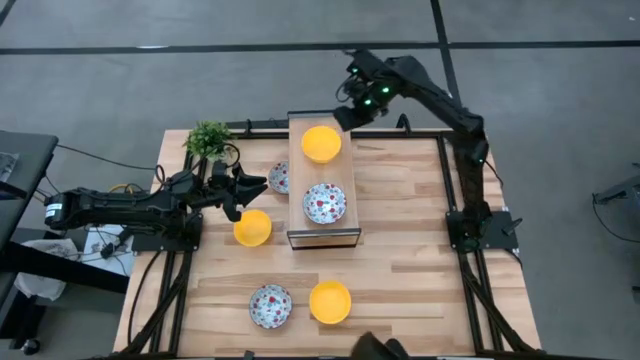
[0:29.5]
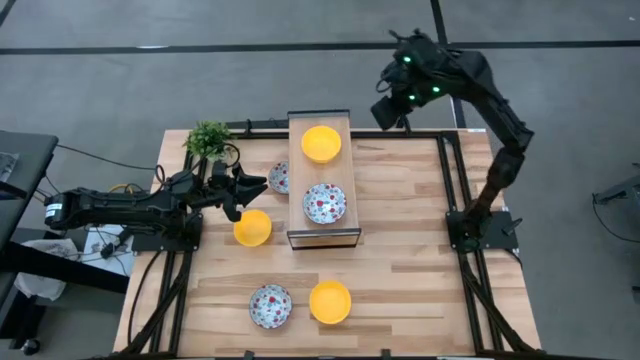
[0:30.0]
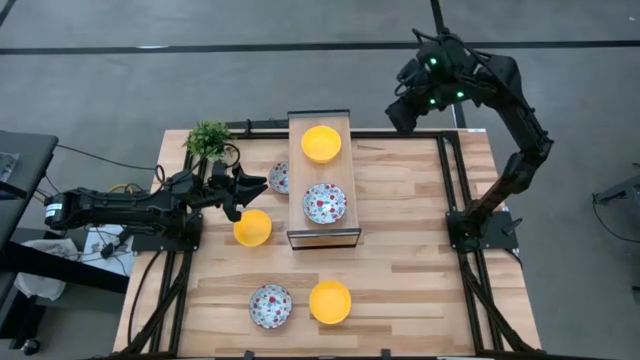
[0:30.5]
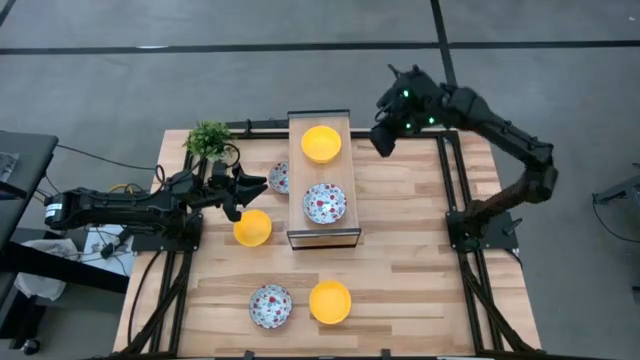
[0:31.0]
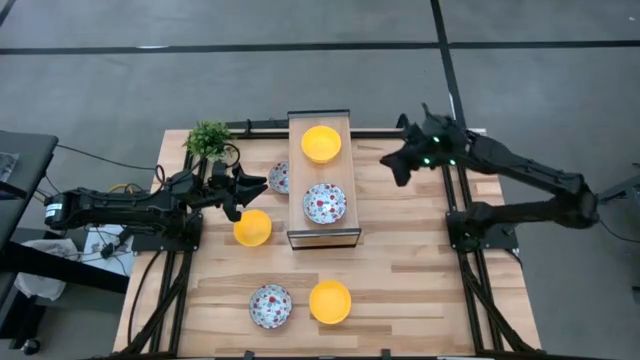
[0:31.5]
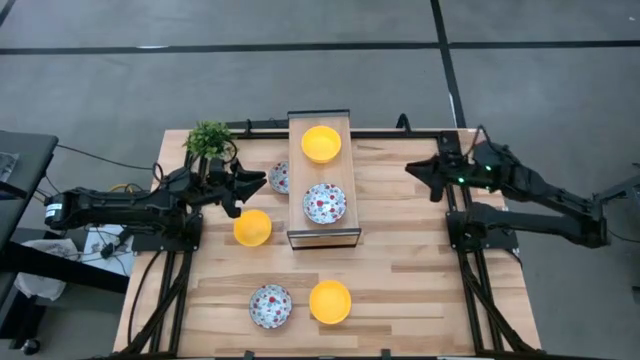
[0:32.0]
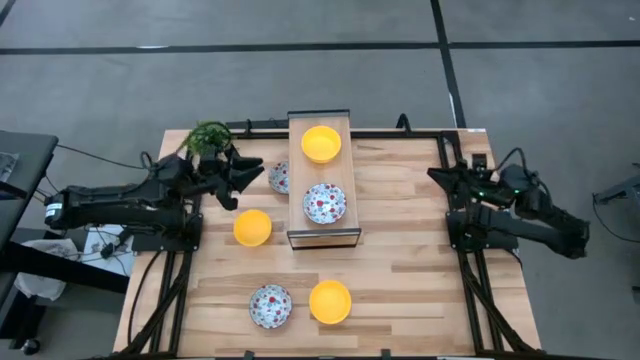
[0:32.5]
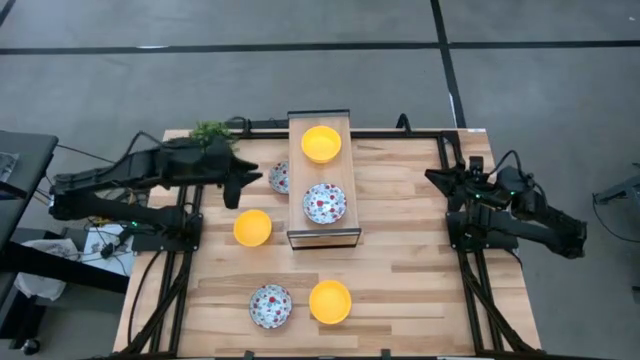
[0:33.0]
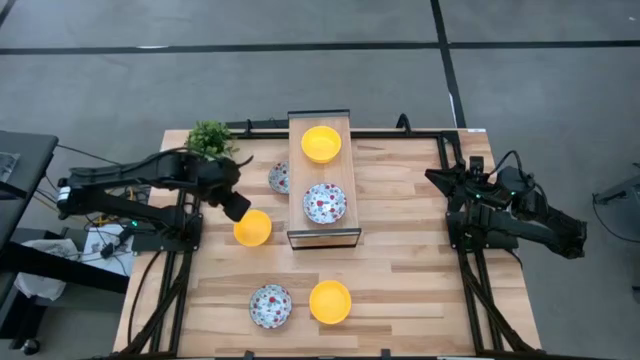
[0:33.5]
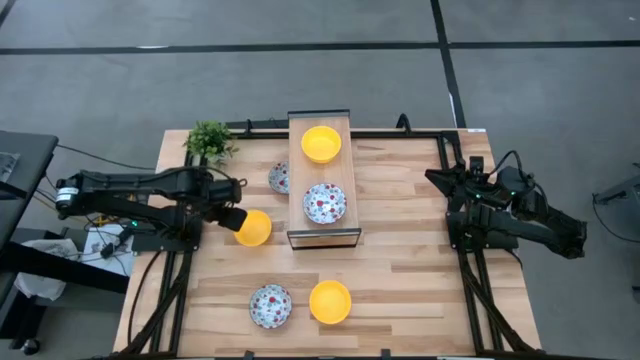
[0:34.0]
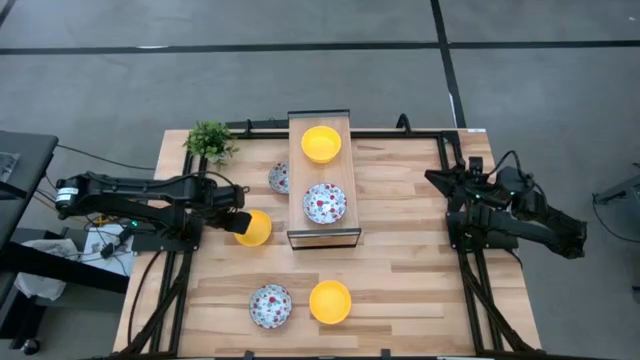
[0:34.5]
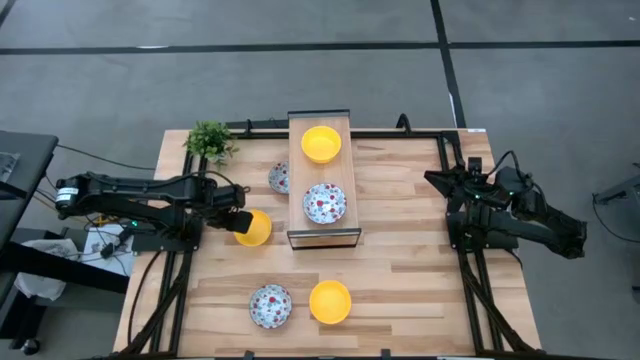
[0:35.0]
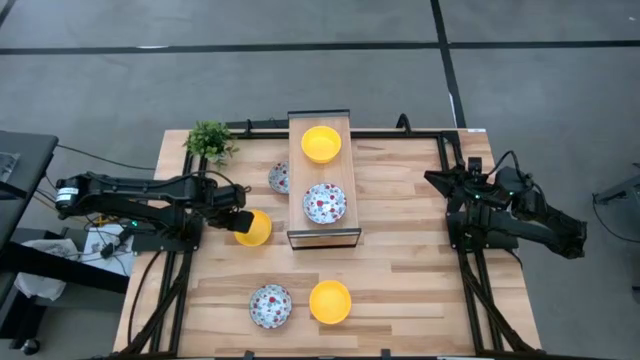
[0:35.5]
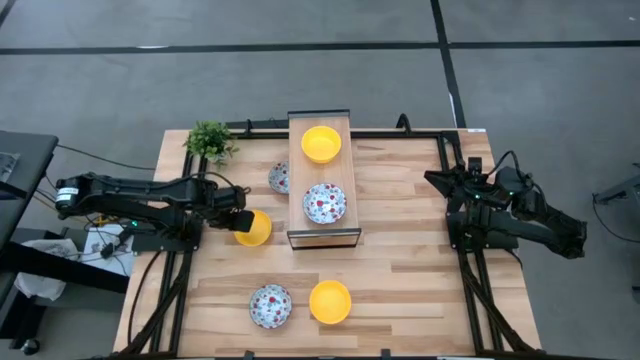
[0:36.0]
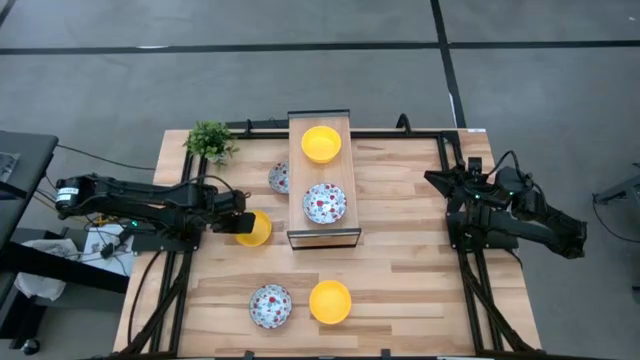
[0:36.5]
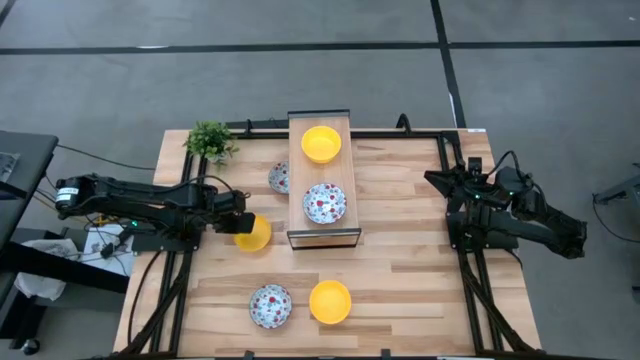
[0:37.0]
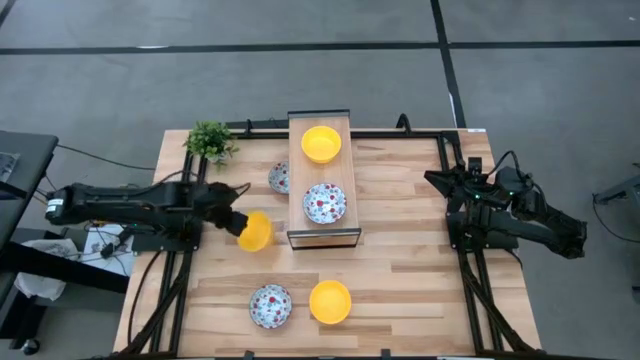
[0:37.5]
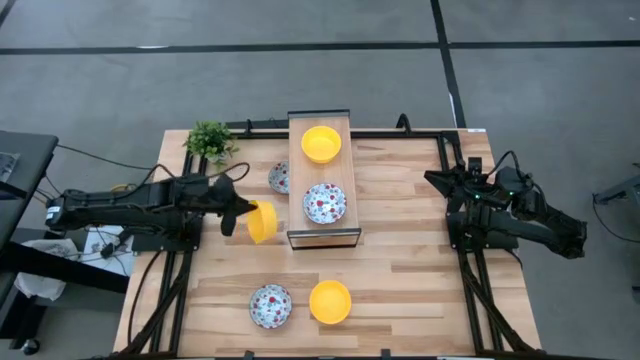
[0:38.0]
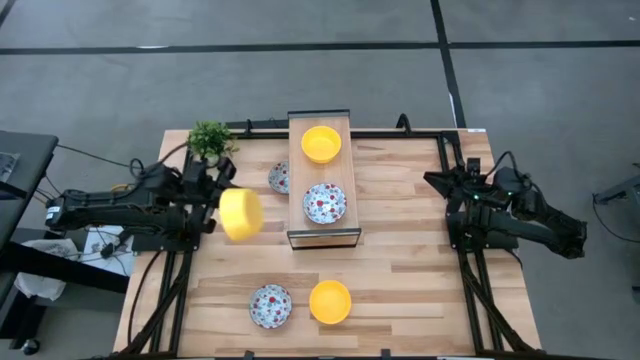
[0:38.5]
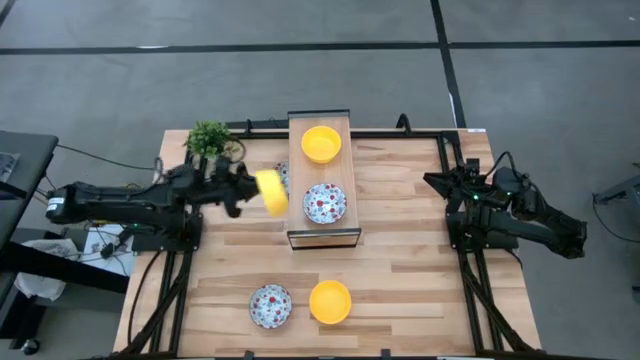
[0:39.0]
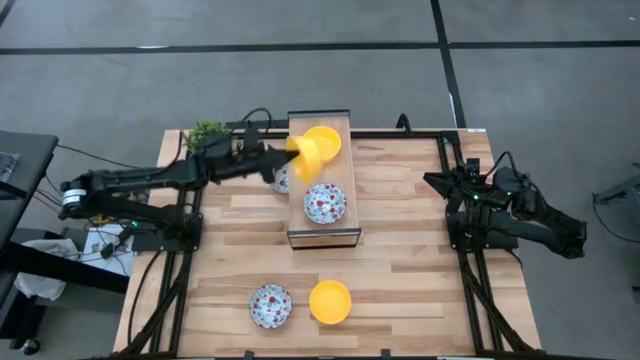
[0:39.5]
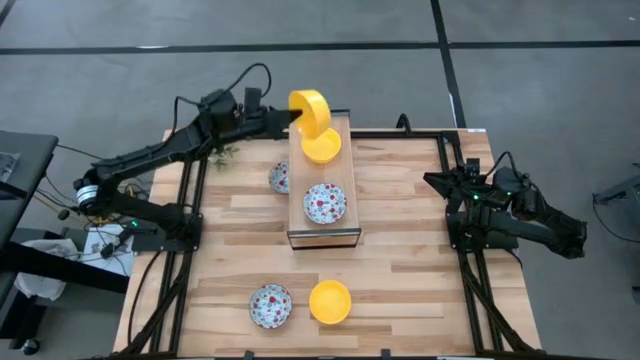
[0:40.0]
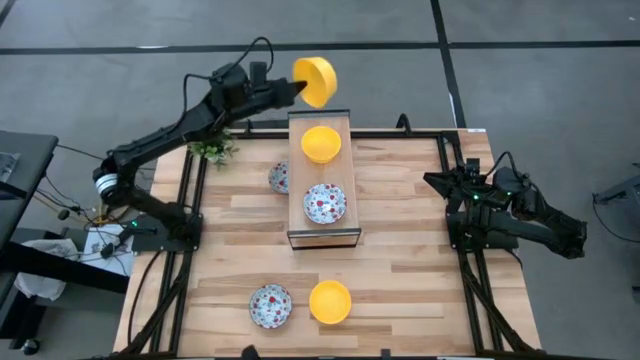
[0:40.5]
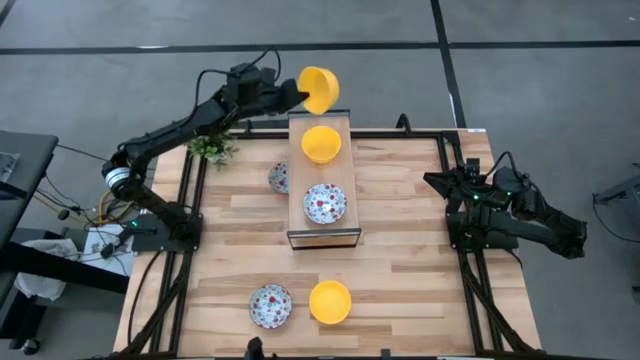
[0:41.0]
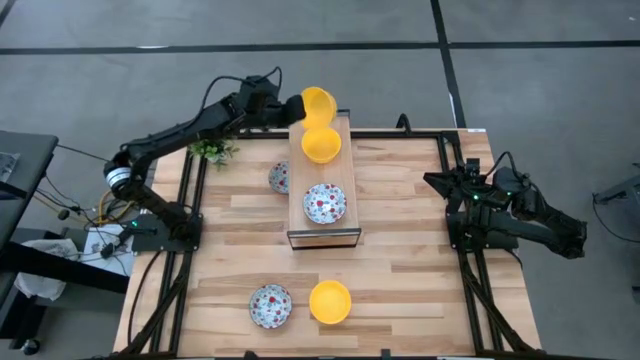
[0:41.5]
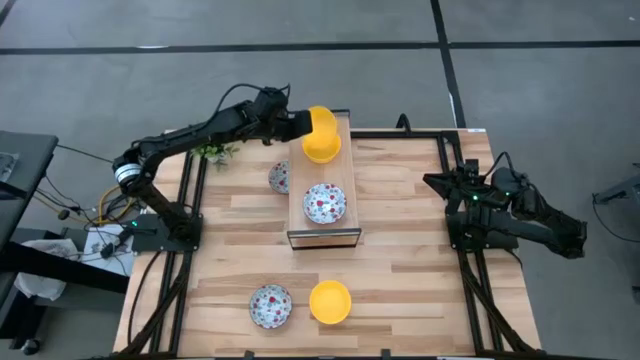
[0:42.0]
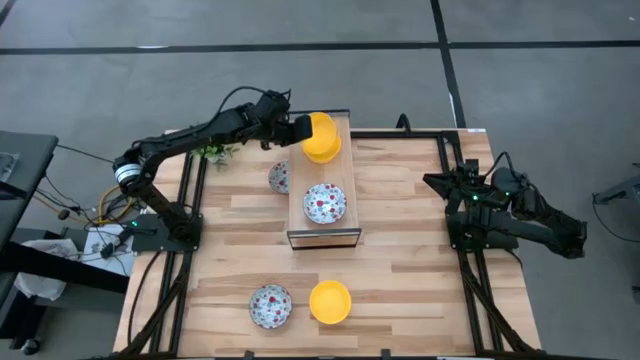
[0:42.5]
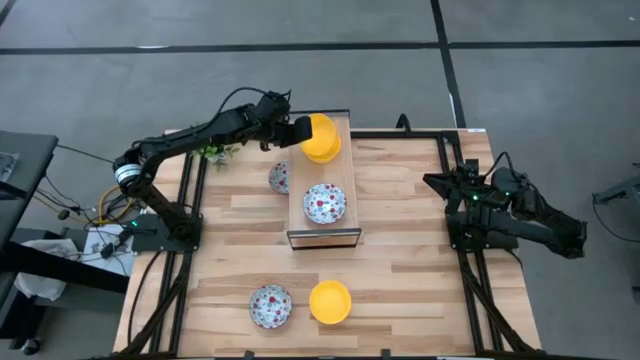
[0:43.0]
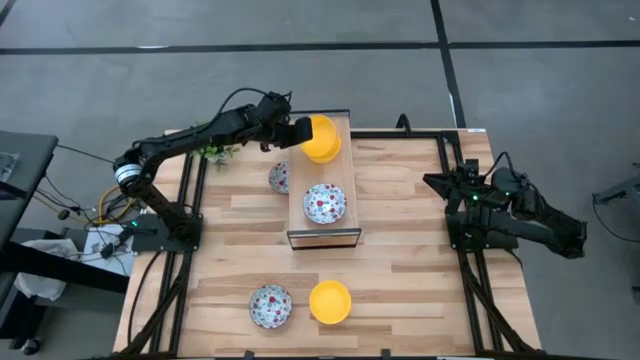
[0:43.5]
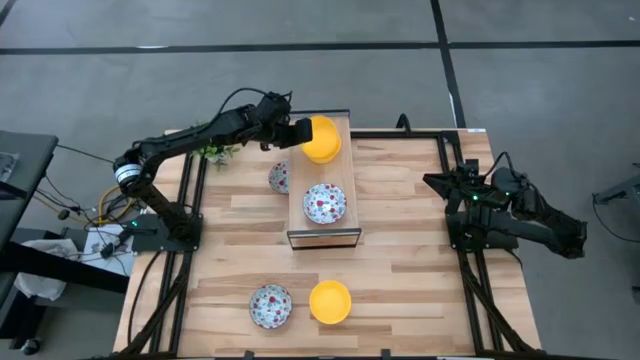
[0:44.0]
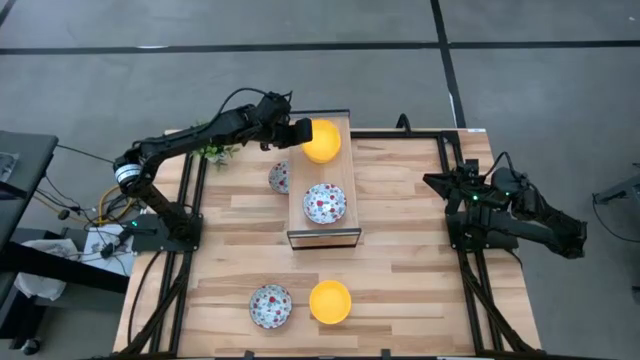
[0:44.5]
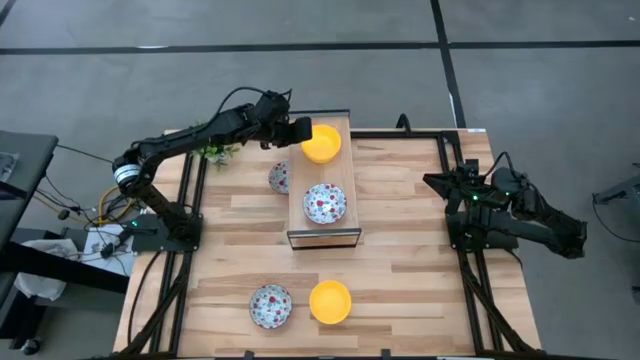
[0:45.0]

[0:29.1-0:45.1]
Task: Pick & Place Mini bowls
Stack the top yellow bowl on top of the yellow bowl on the shelf

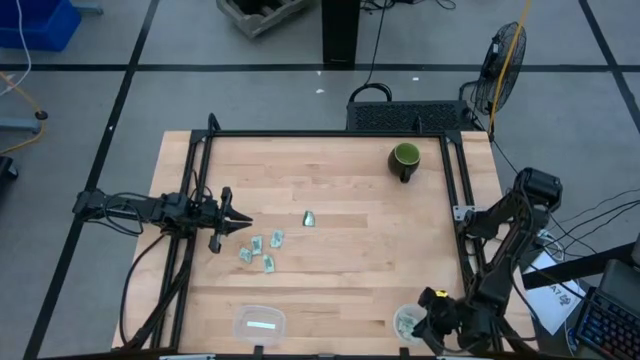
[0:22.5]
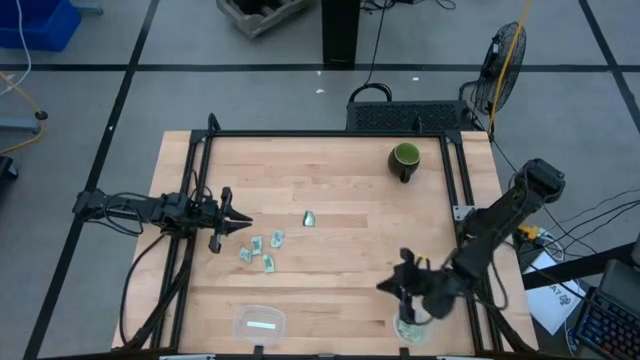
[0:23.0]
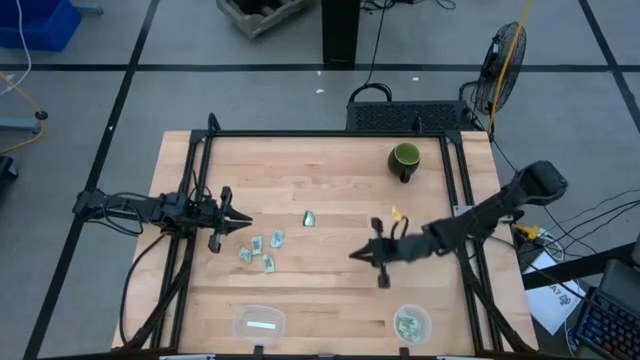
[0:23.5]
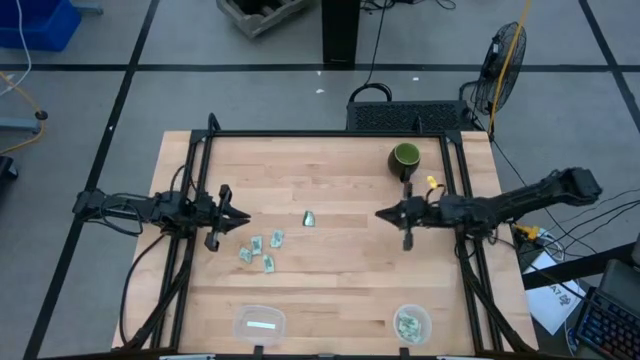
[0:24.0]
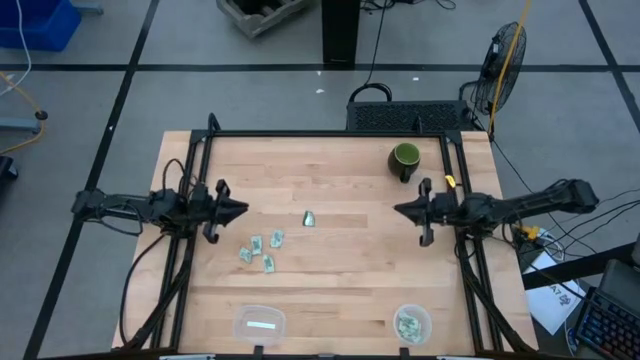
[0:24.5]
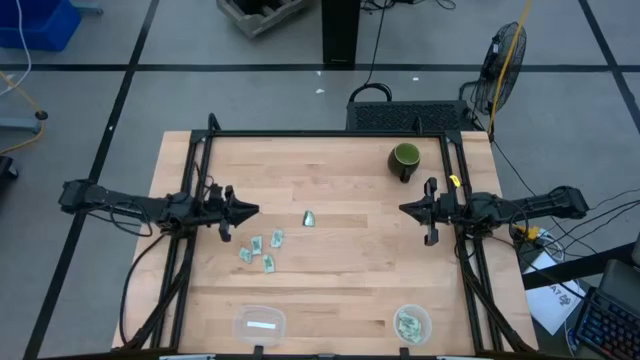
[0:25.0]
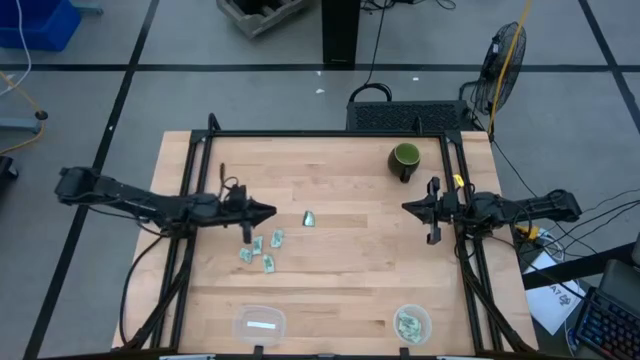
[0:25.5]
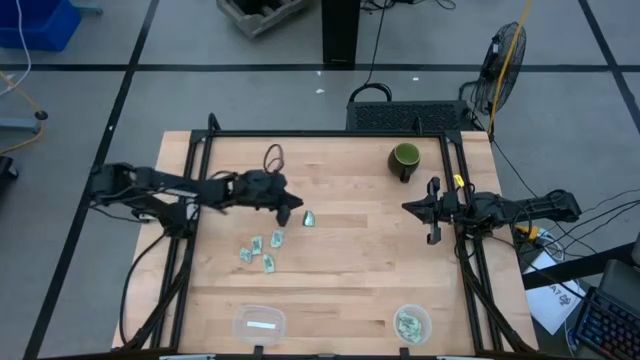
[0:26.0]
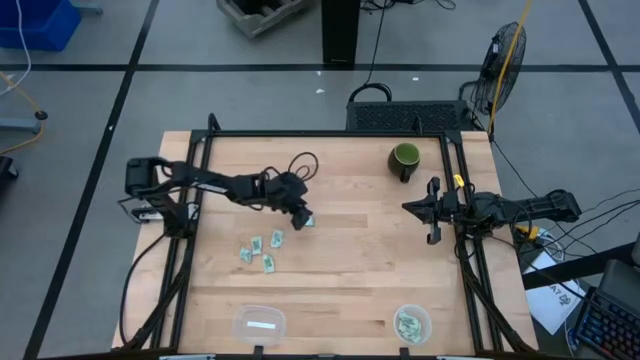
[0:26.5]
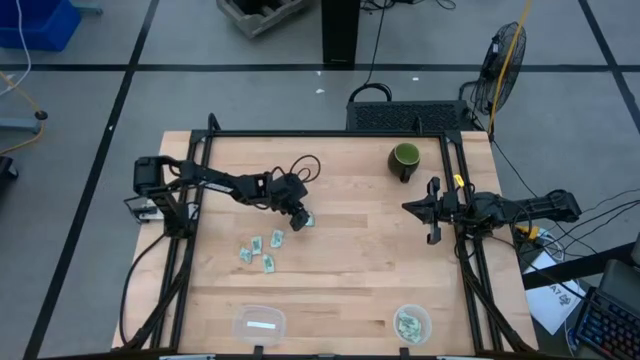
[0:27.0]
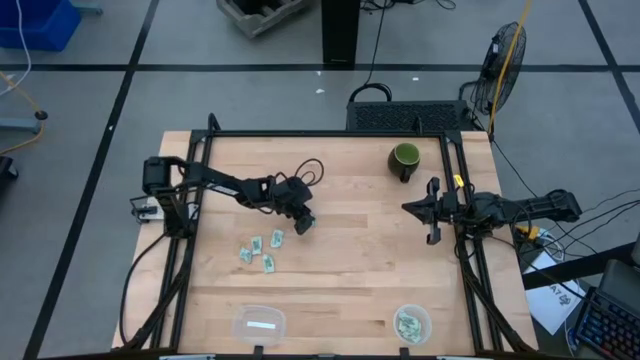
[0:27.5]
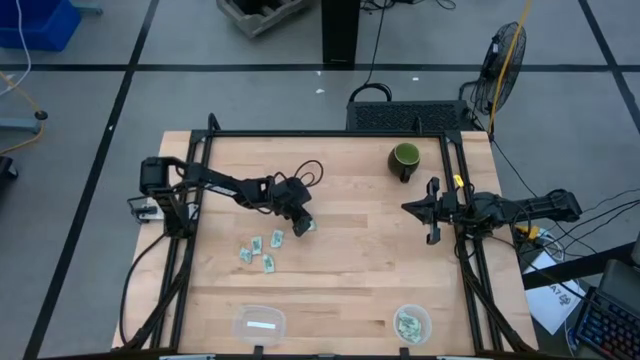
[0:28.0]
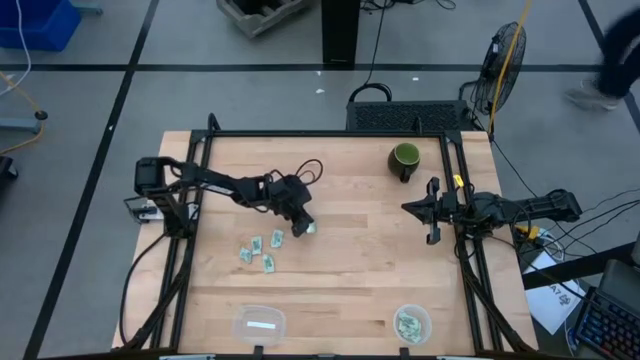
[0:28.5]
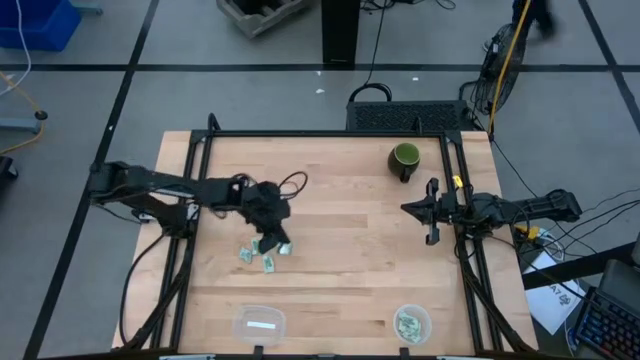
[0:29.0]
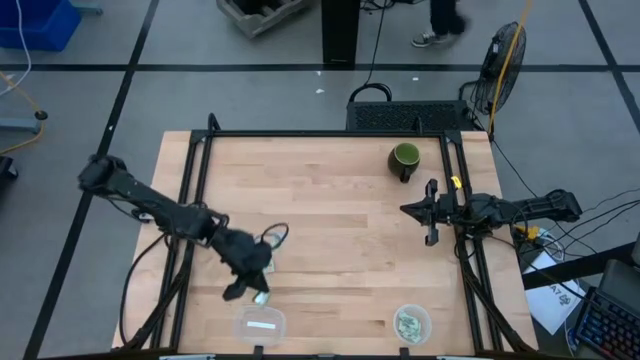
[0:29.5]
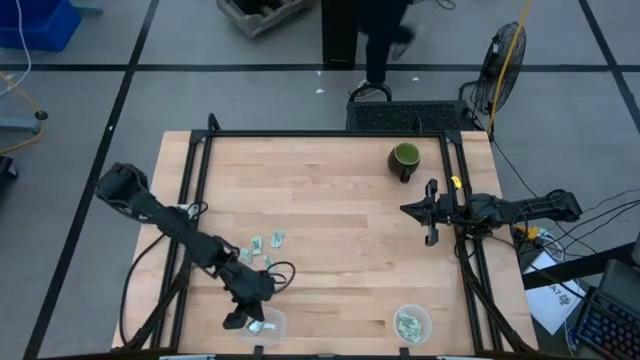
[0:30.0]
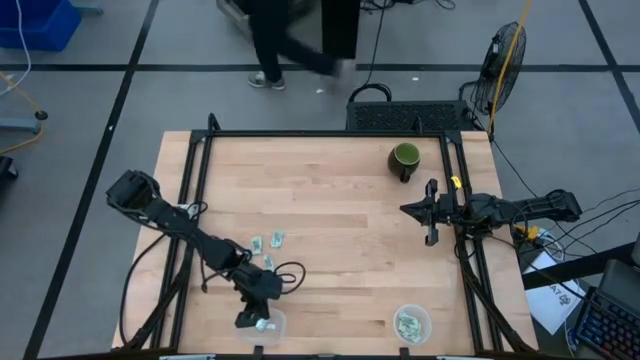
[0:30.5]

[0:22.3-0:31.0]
Task: Pick and place Stevia / Truvia into bins
Put the truvia packet into the left transparent container
